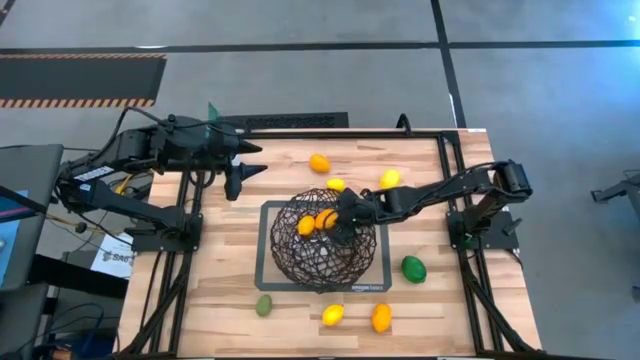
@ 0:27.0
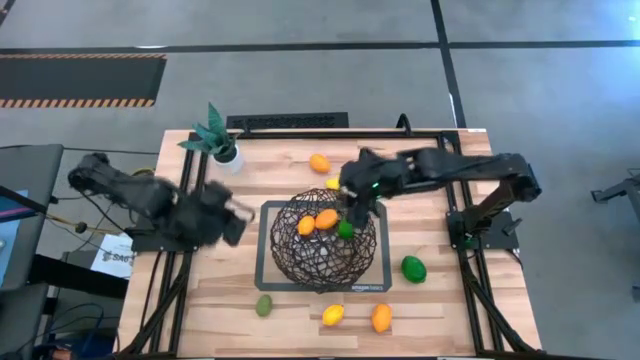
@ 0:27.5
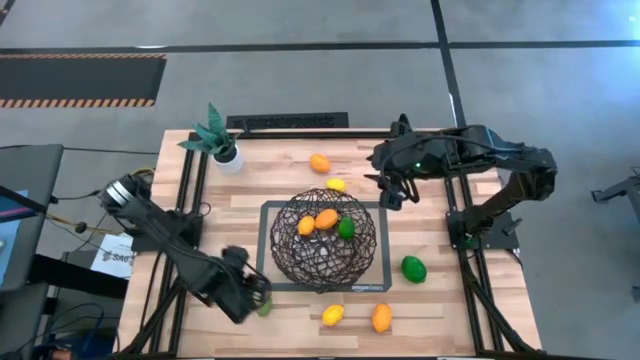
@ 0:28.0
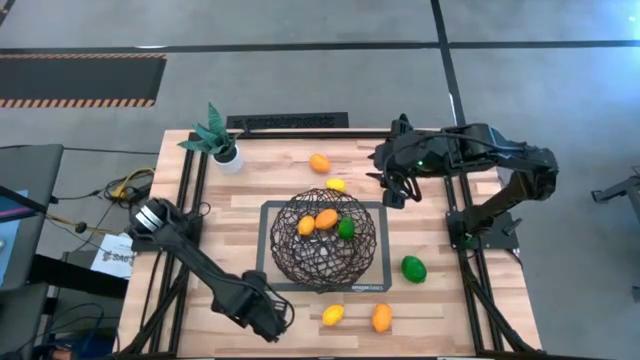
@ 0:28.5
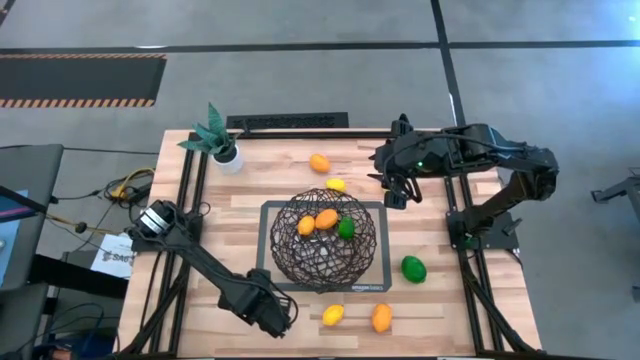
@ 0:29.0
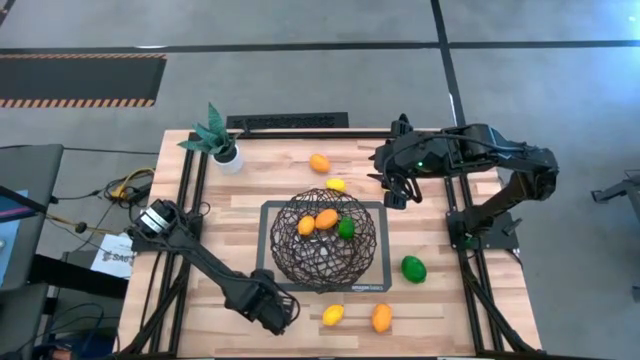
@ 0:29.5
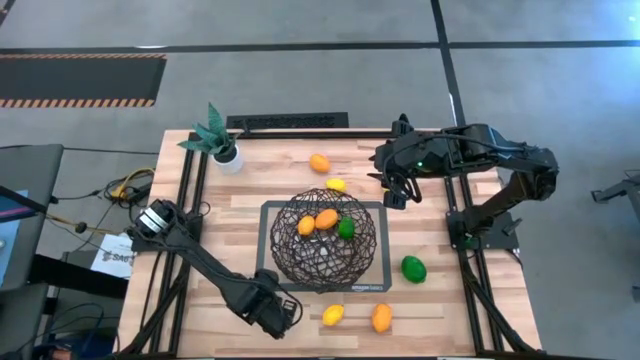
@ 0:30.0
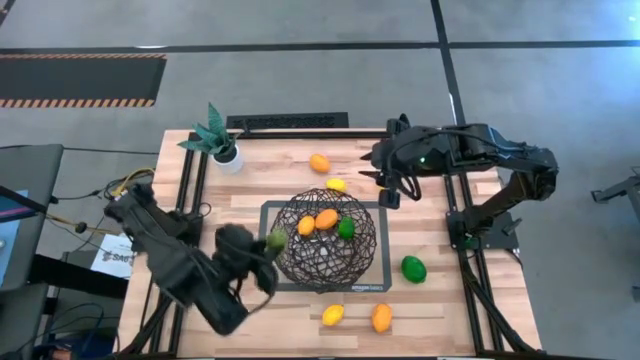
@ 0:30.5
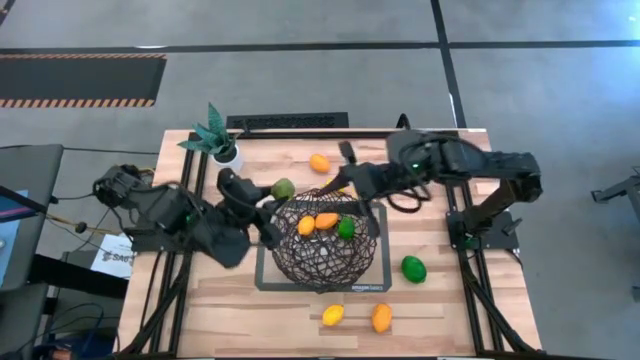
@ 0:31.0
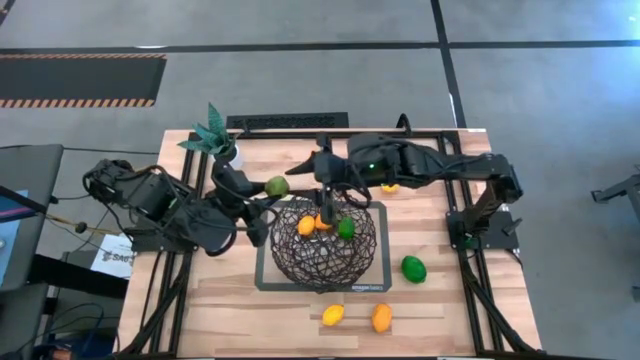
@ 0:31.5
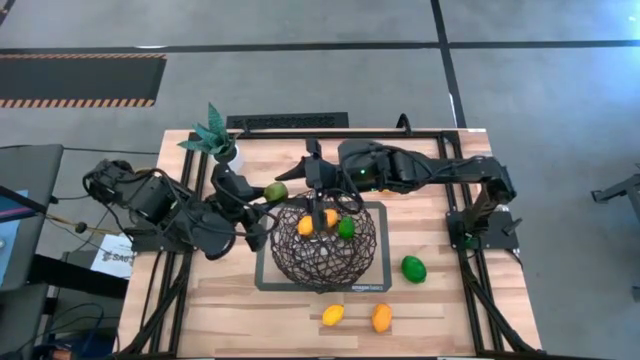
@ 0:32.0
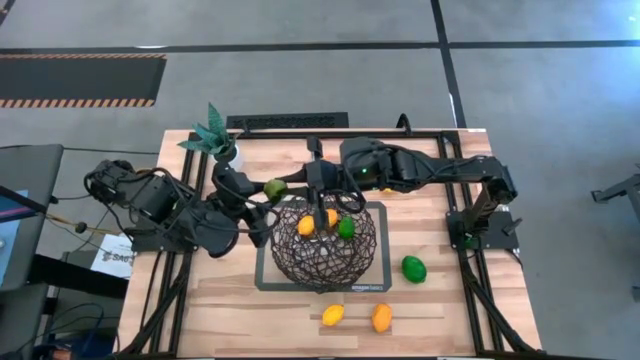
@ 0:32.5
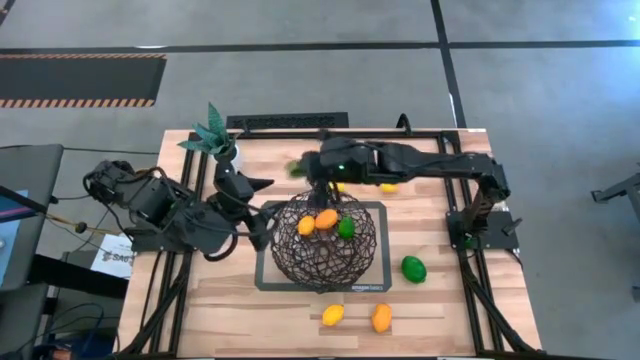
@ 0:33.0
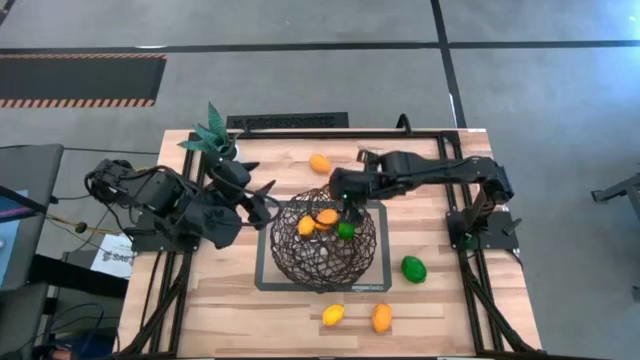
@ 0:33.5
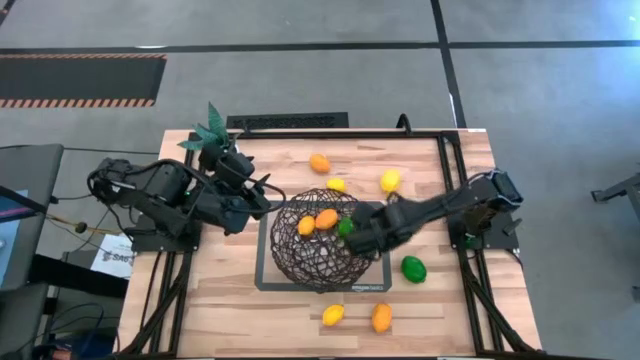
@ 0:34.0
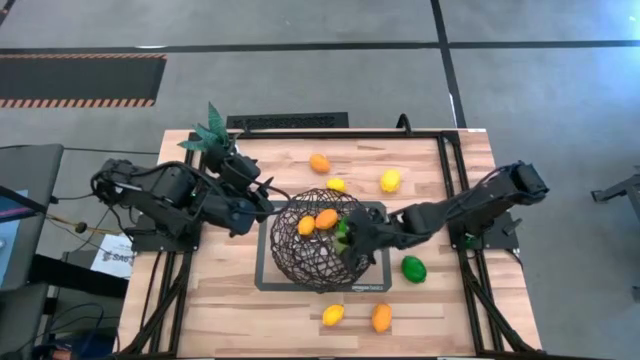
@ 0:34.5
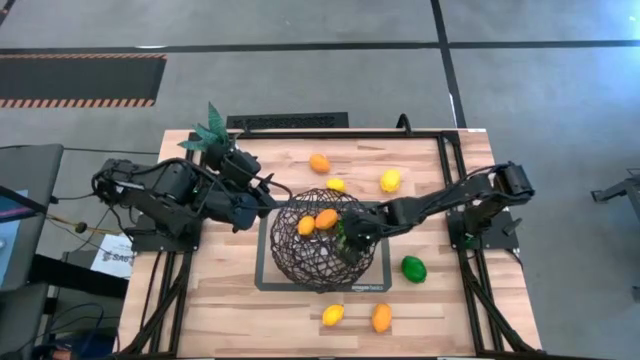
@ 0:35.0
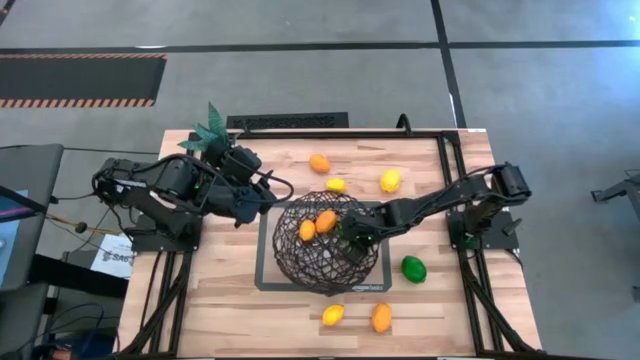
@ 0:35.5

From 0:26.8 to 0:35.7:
Task: Build produce basket
Put the left lime into the basket

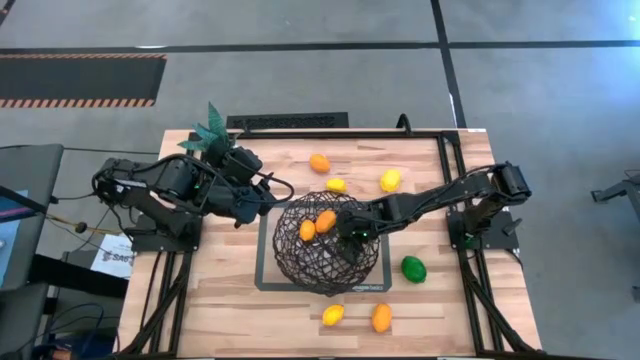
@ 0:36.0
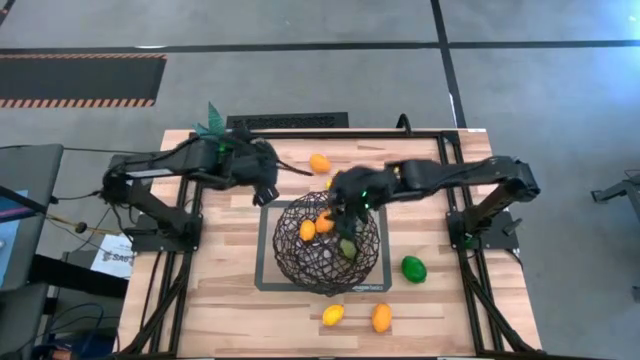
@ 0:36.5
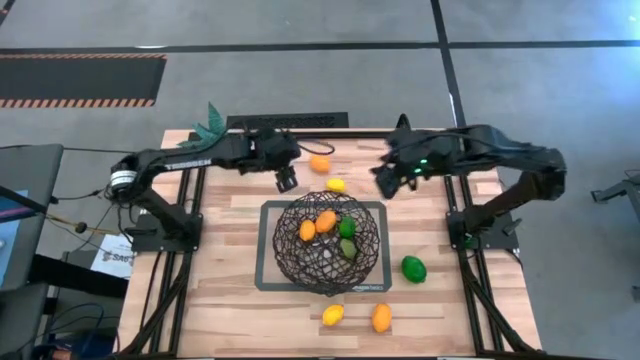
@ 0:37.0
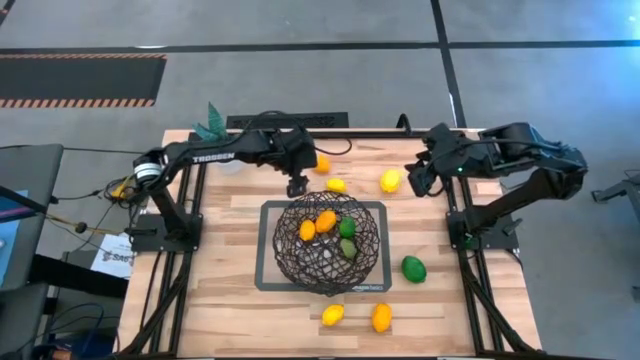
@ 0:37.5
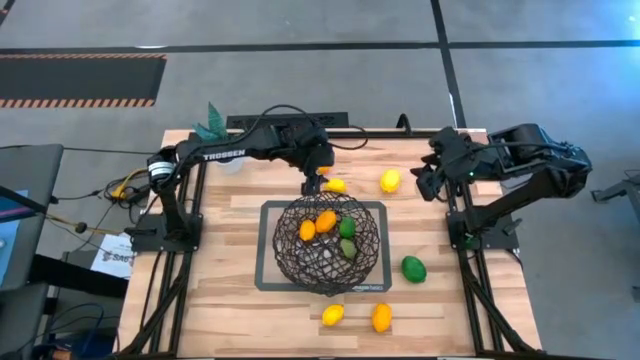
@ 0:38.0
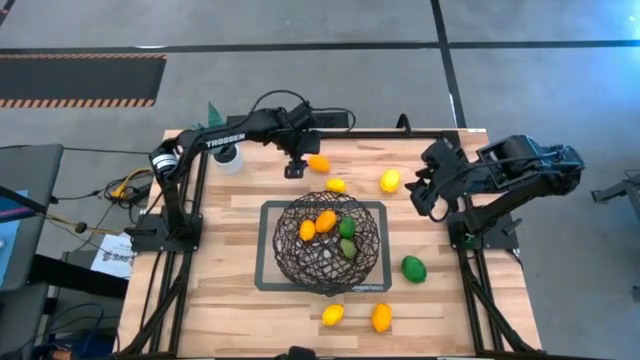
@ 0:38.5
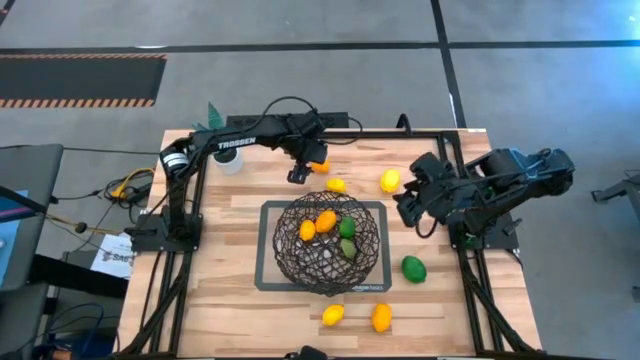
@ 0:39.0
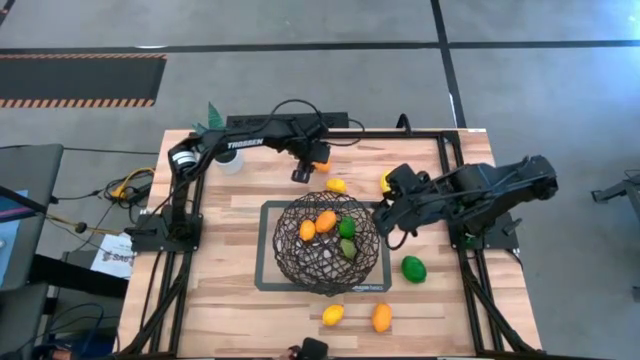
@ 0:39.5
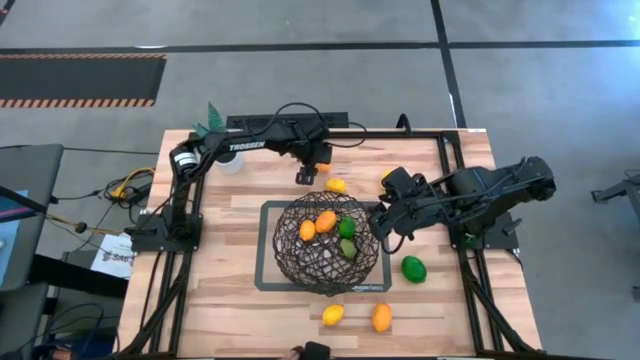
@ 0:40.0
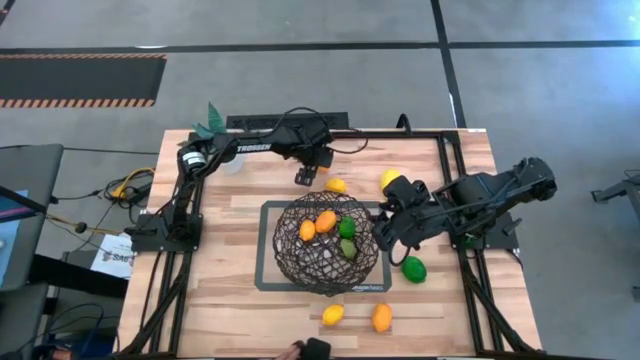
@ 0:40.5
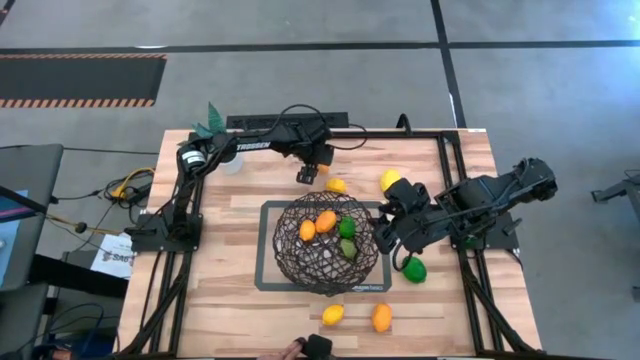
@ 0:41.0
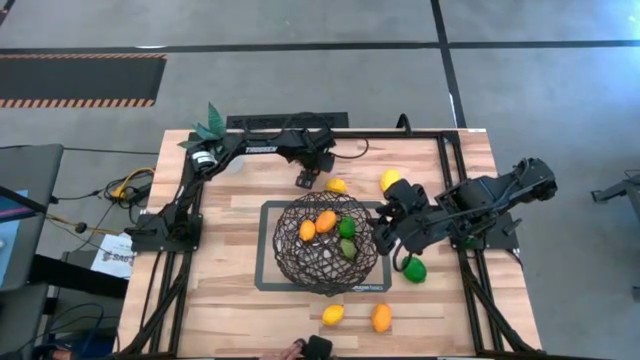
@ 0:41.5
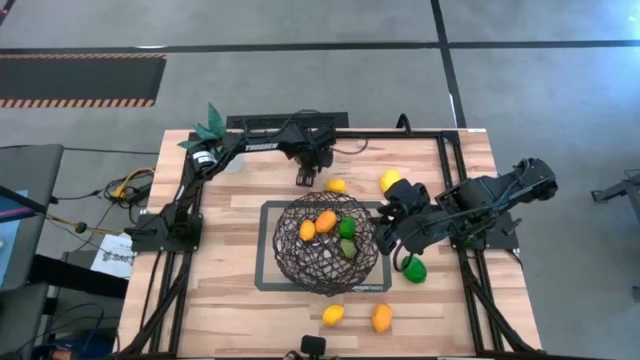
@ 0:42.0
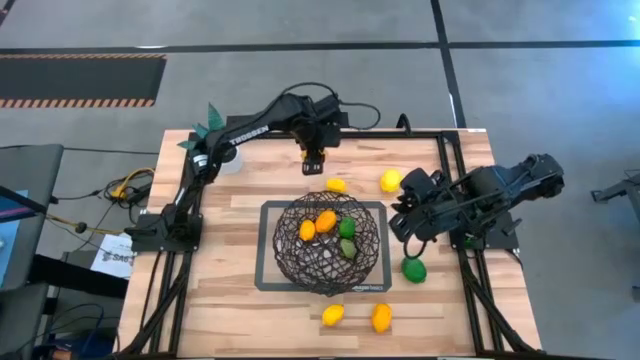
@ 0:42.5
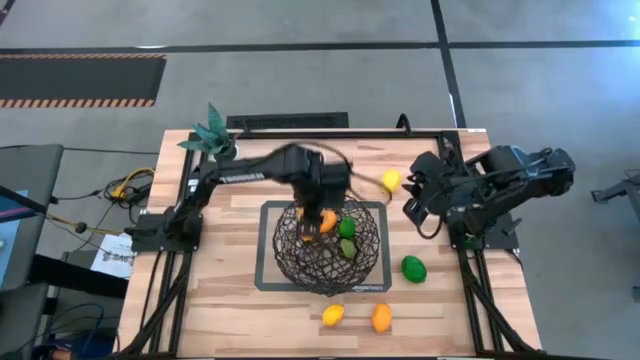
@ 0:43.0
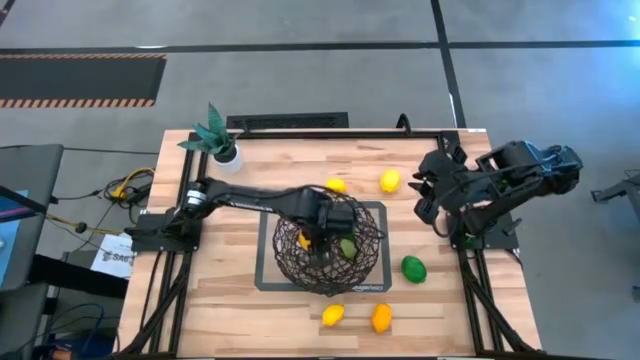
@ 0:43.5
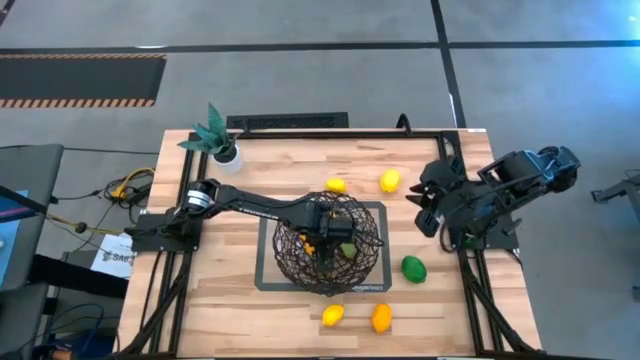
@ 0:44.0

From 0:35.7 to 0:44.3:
Put the lemon into the basket

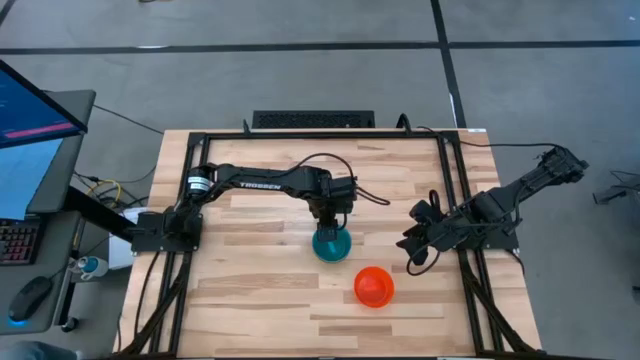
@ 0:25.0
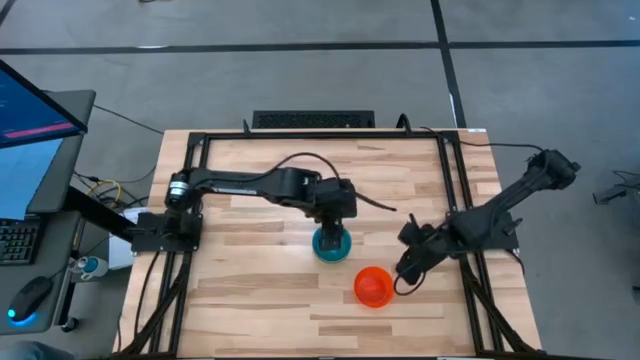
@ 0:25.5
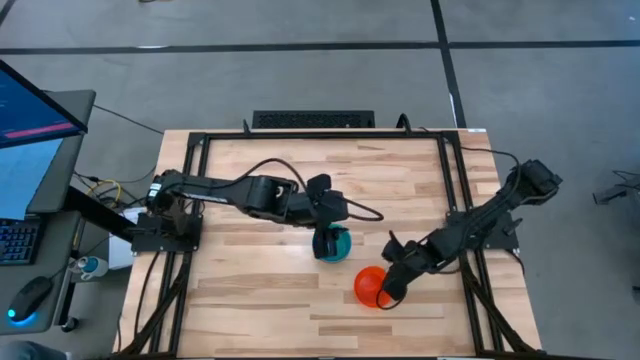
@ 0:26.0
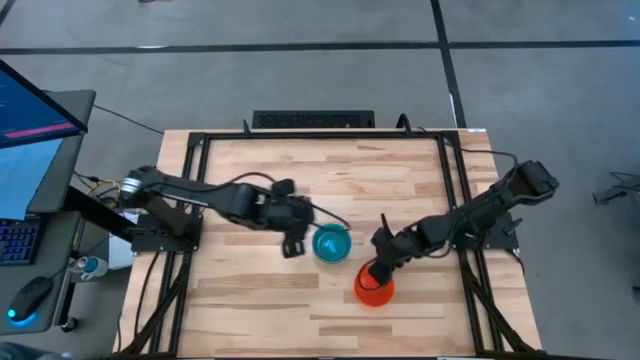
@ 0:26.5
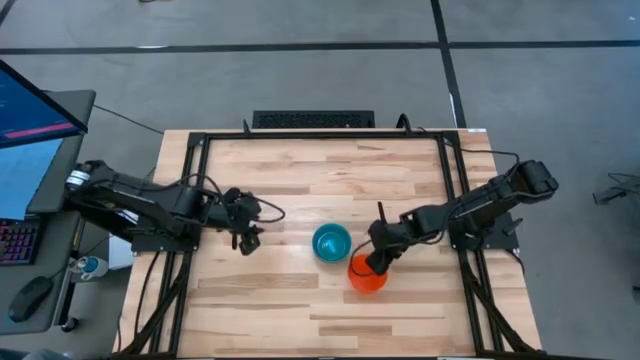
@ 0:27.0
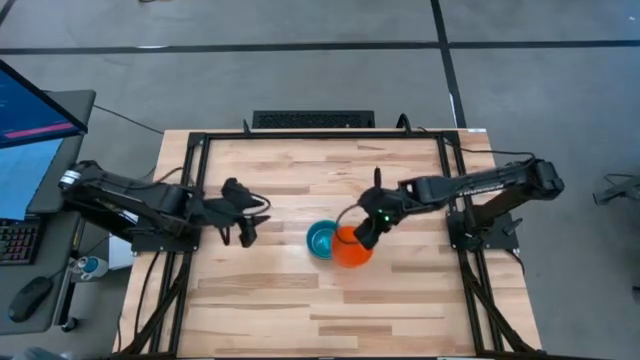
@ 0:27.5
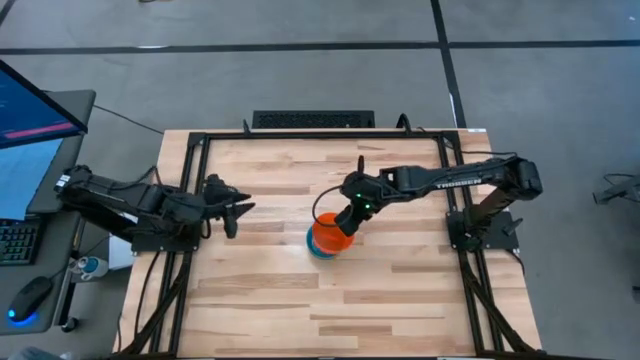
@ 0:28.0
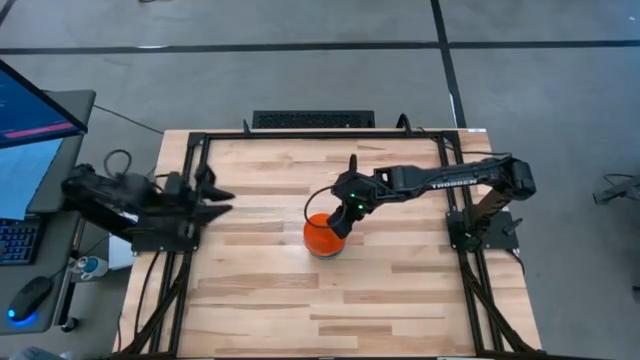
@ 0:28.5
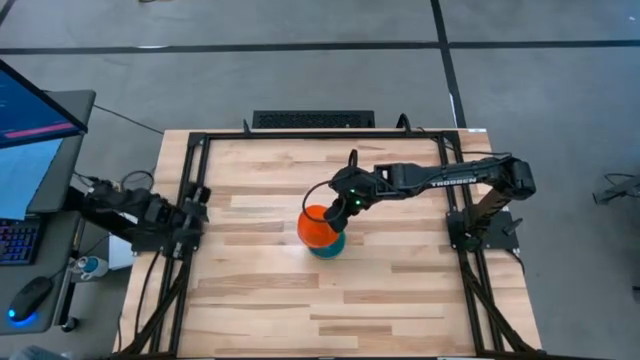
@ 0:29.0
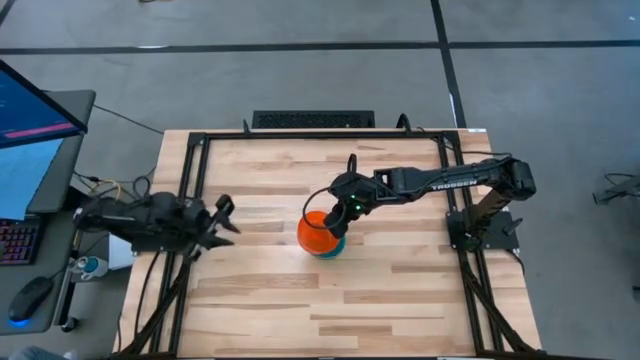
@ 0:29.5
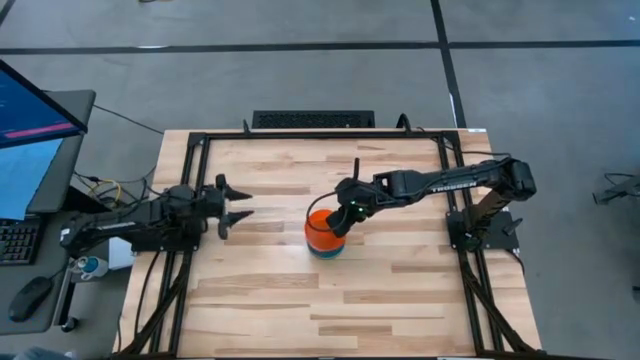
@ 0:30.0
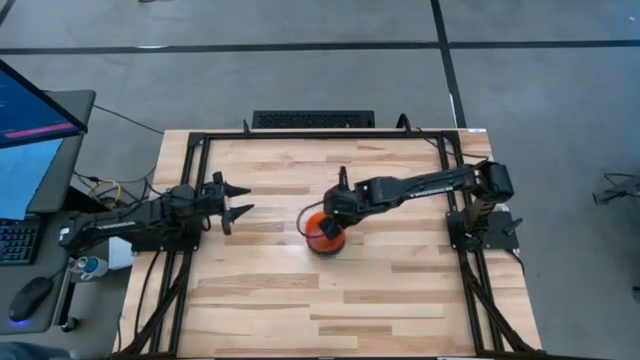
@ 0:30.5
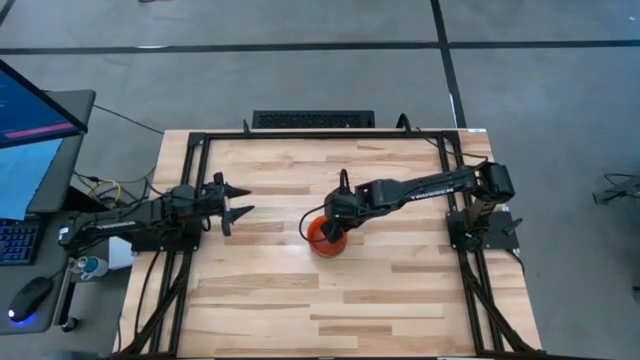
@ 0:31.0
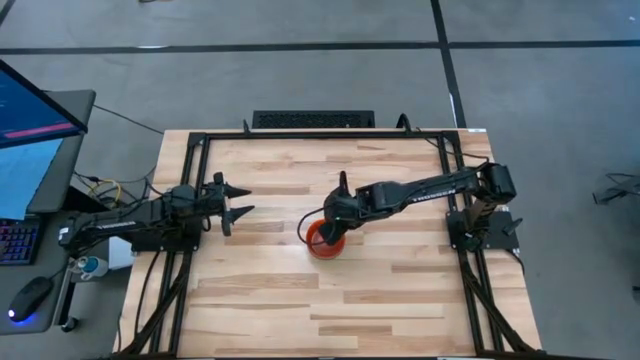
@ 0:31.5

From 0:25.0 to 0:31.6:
Task: Nest bowls inside each other
Stack the orange bowl on top of the blue bowl
